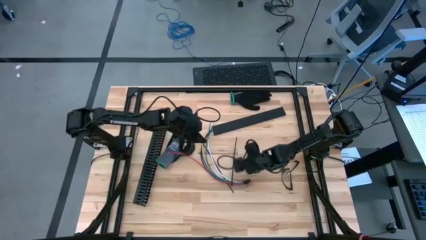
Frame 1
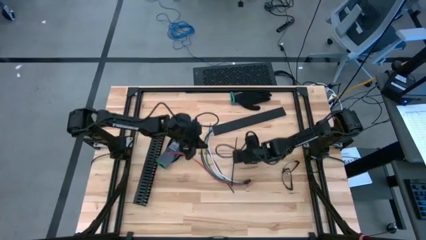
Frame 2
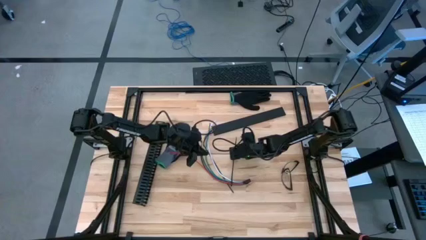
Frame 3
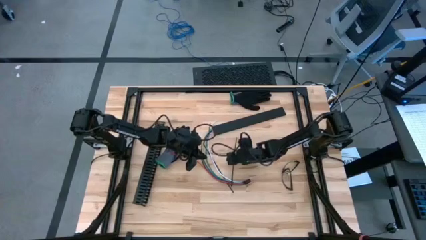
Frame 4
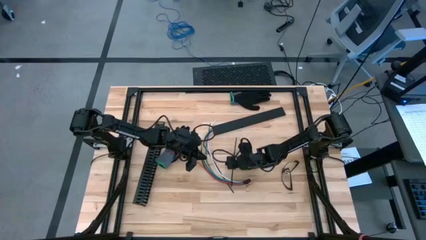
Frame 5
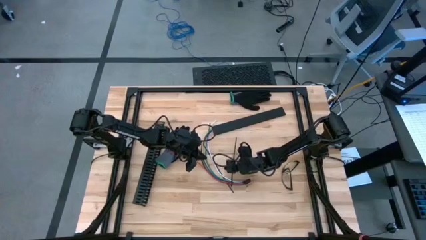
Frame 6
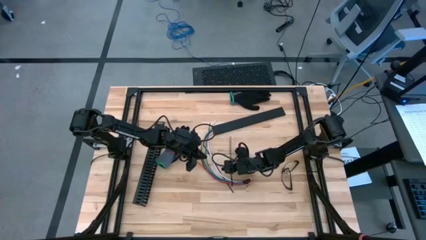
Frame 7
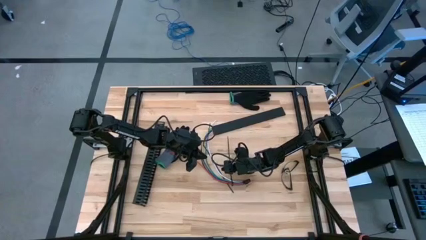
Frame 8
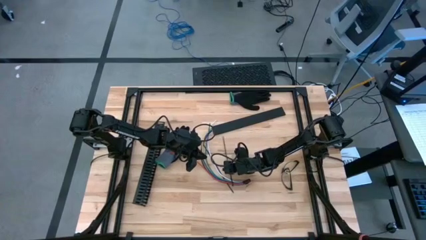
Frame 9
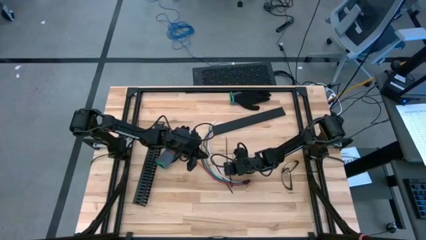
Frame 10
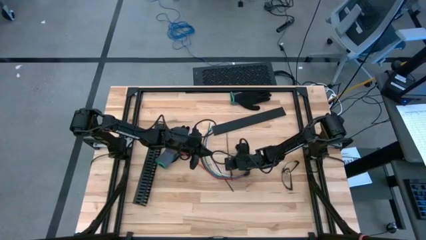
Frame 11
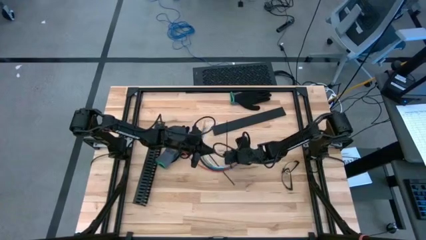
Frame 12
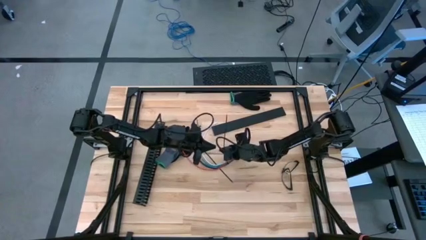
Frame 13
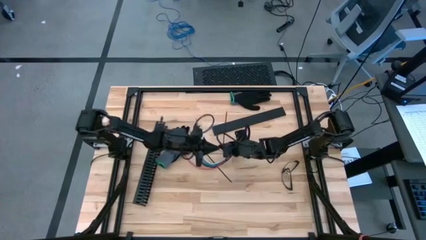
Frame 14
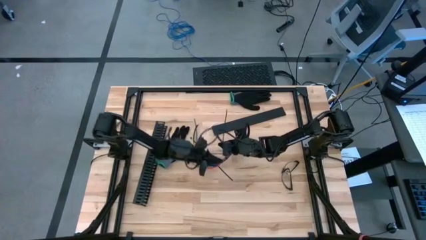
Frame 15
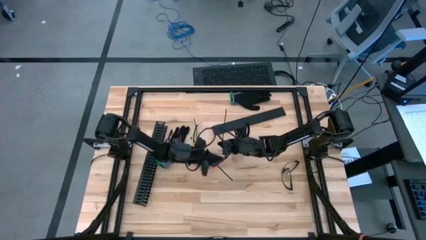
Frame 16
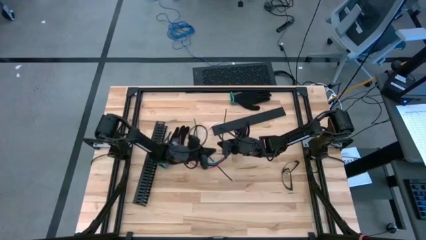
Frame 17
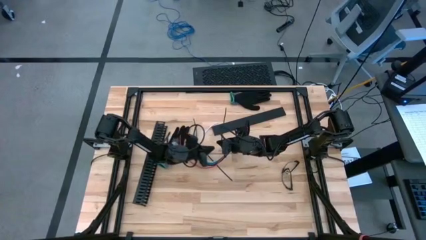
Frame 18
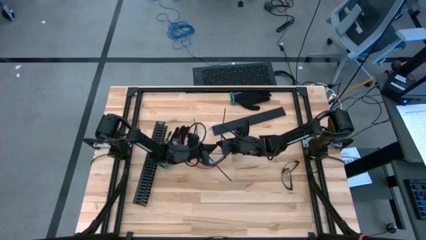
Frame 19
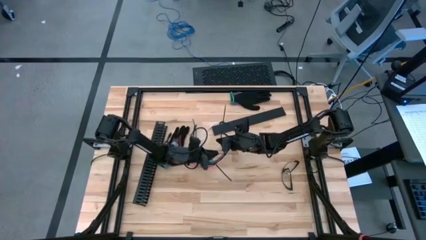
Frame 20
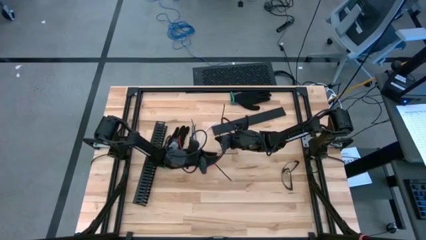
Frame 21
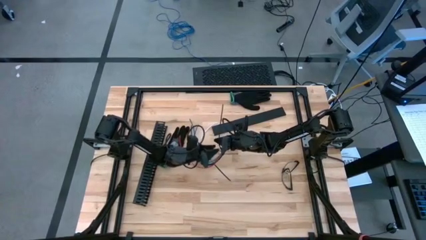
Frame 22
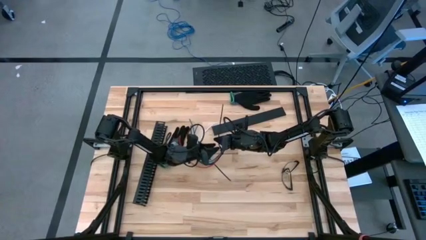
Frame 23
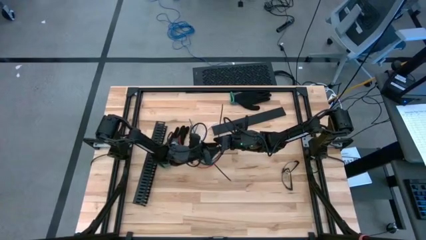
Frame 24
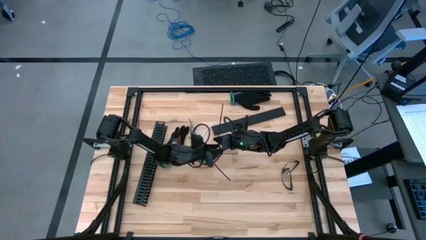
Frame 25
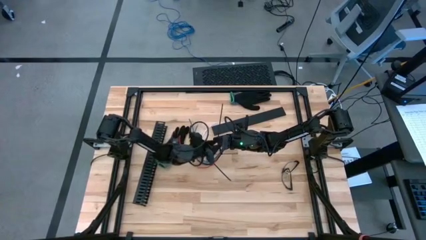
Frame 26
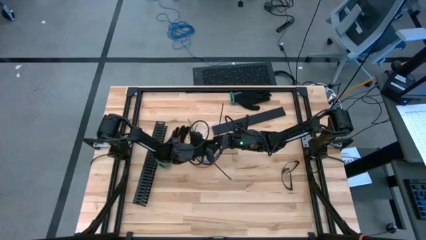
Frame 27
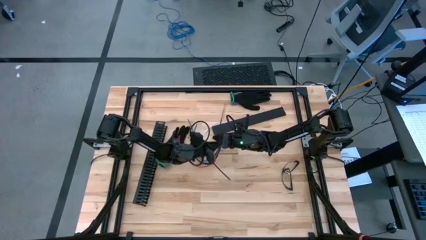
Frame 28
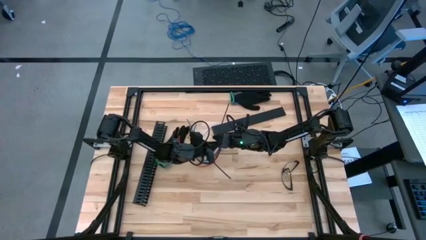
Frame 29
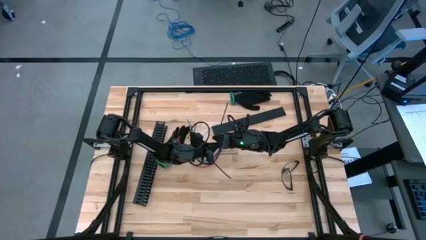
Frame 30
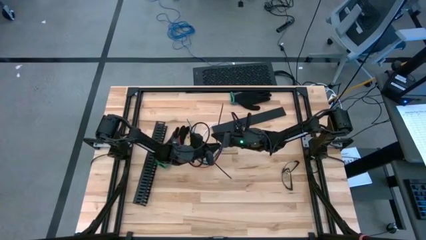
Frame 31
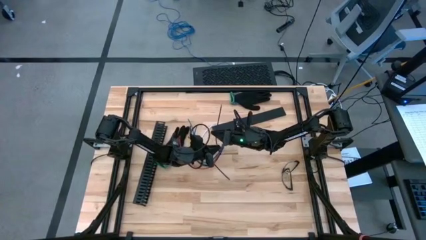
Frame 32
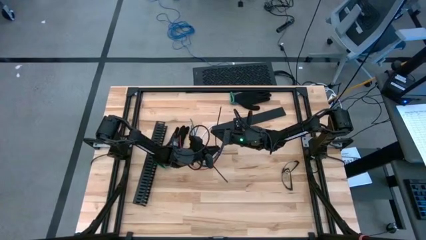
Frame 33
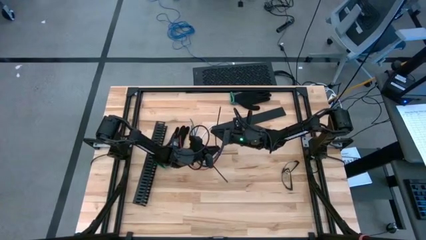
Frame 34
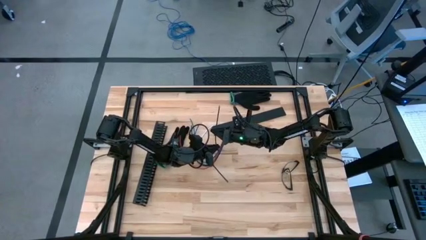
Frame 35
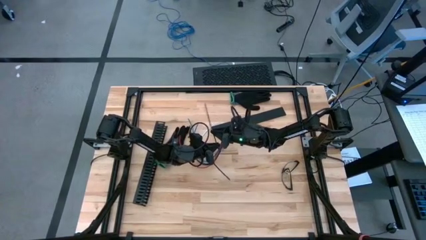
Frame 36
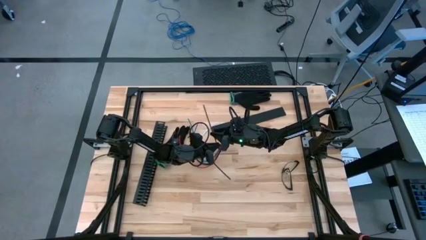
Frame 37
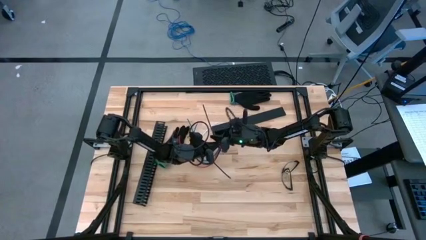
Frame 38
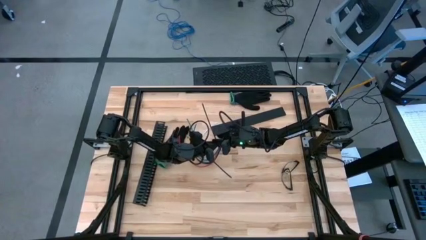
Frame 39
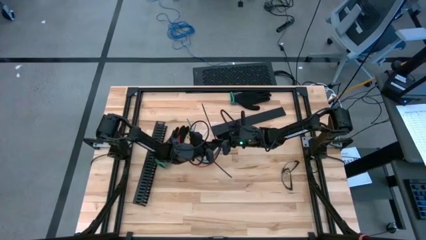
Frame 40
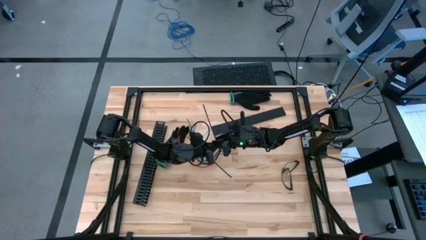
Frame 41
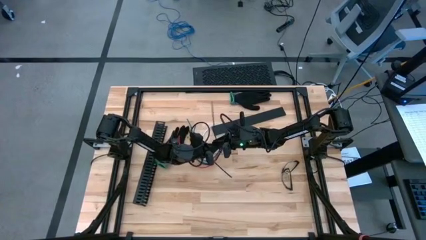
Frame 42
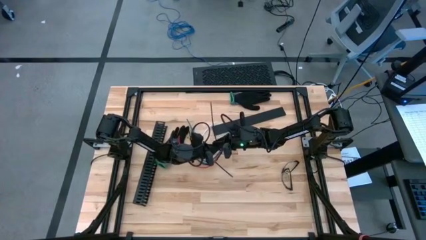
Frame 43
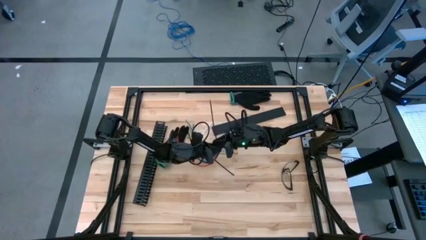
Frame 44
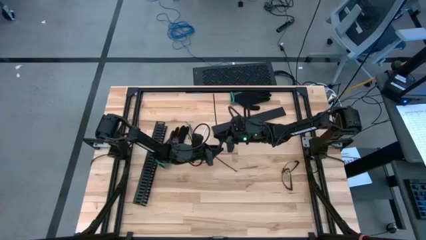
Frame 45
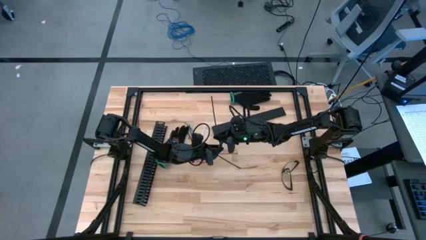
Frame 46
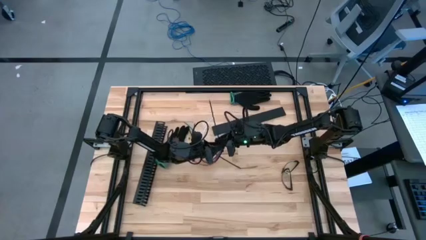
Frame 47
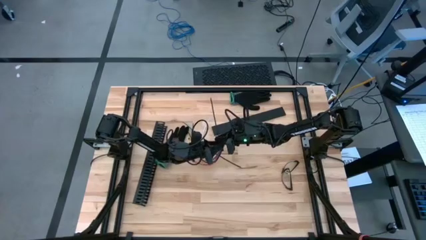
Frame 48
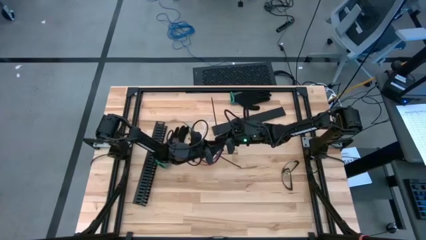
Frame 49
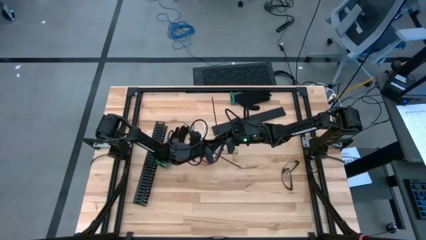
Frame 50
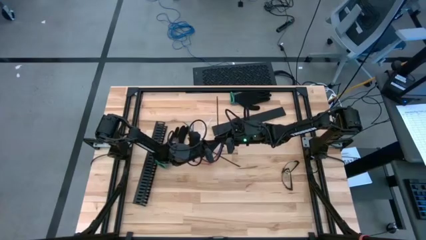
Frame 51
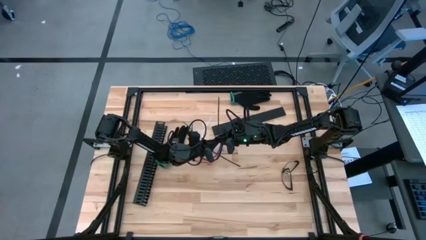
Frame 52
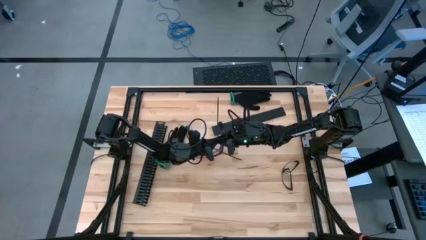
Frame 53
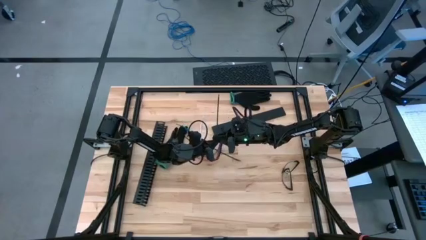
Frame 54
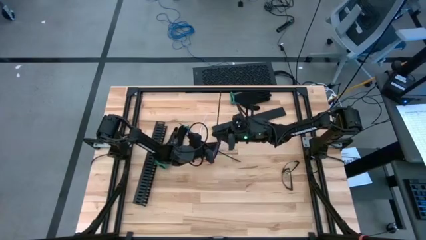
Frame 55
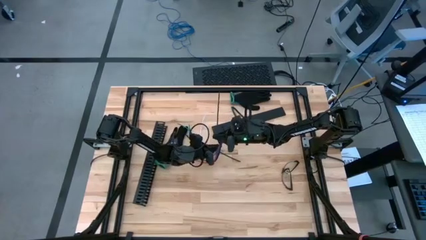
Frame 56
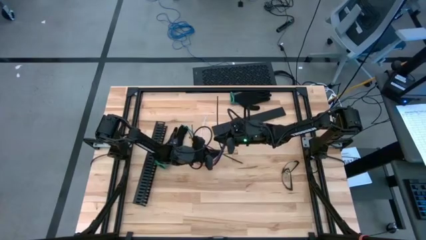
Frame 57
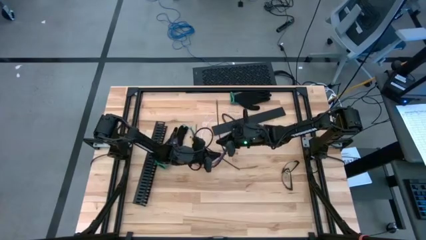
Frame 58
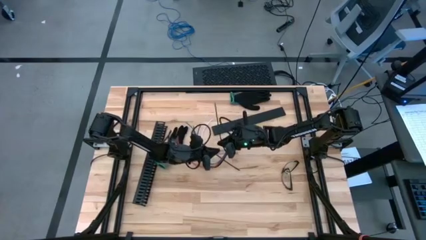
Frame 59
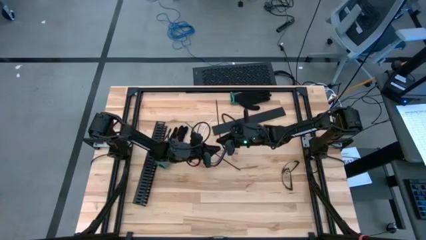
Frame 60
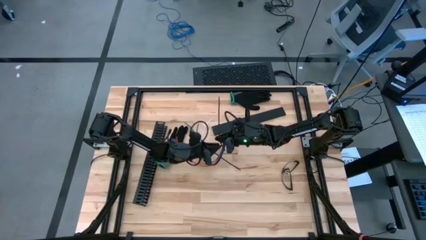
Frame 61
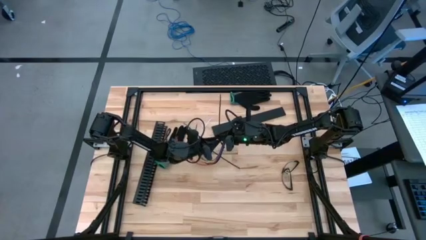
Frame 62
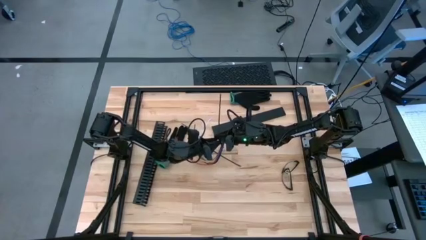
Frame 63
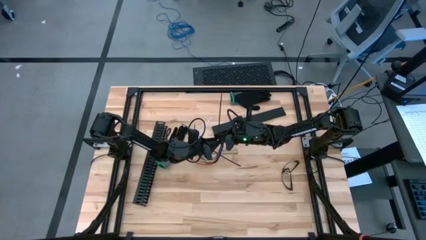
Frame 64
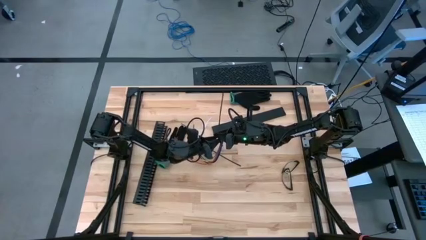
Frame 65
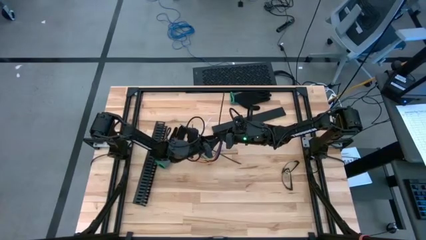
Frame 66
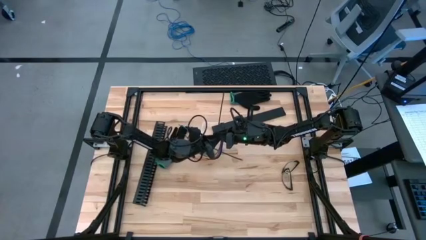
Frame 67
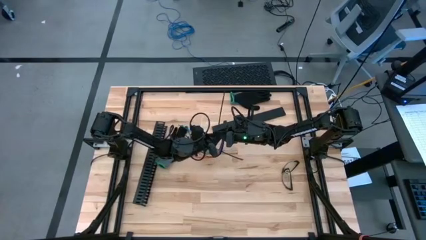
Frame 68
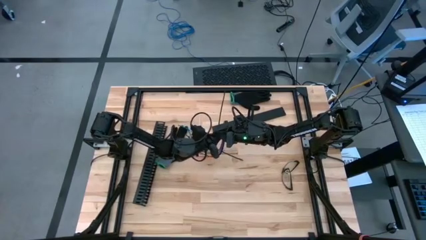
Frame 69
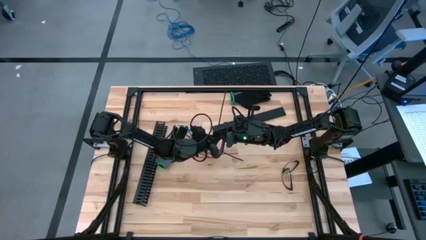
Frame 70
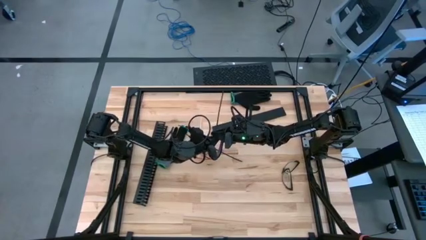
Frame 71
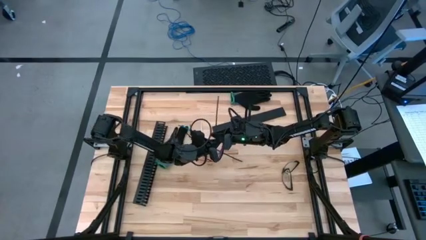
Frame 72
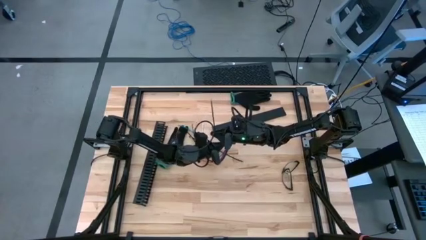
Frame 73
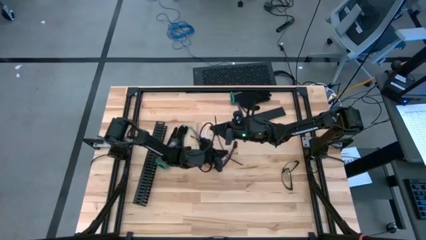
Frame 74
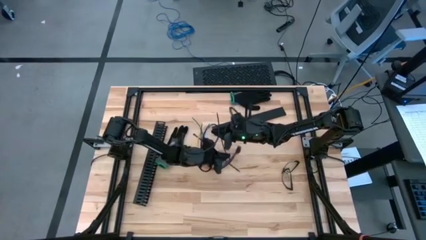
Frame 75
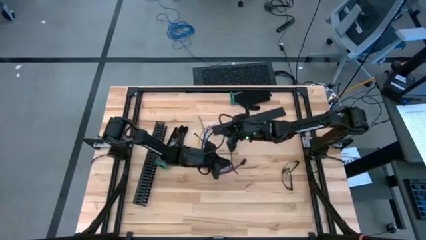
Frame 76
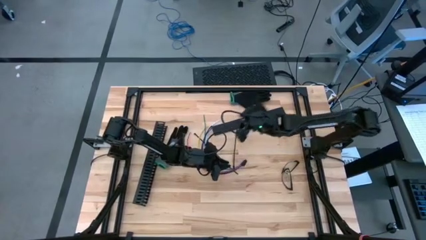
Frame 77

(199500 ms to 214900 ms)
Task: Ziptie cables
Wrap the cable wires with the black zip tie
